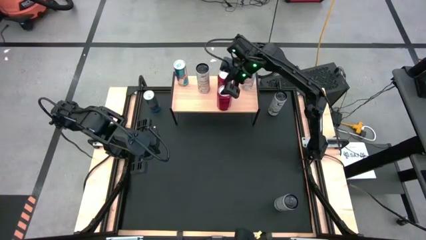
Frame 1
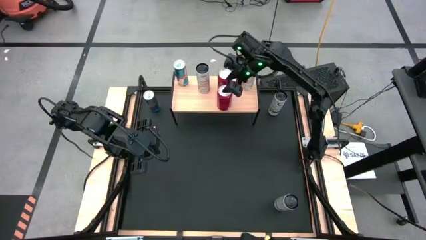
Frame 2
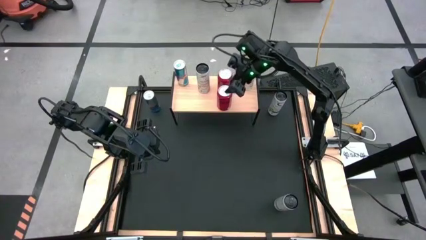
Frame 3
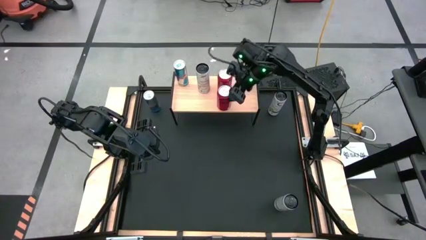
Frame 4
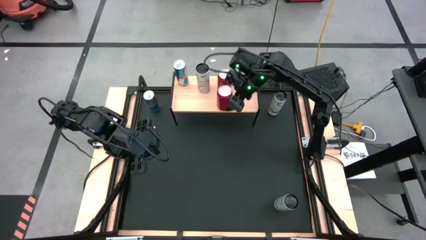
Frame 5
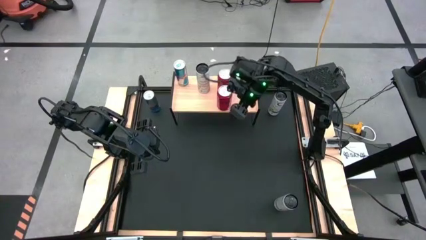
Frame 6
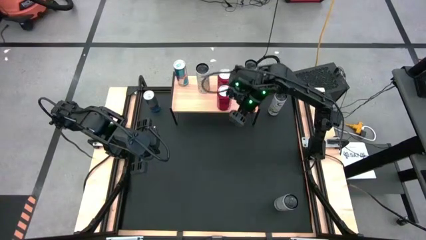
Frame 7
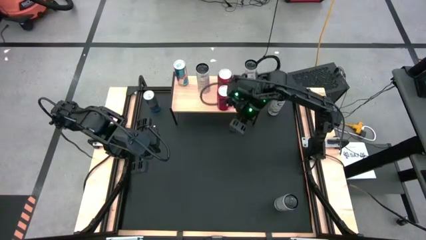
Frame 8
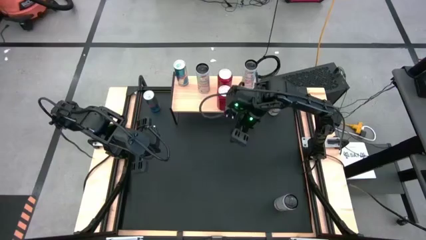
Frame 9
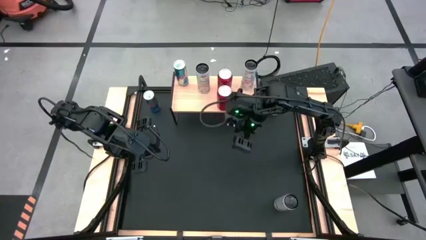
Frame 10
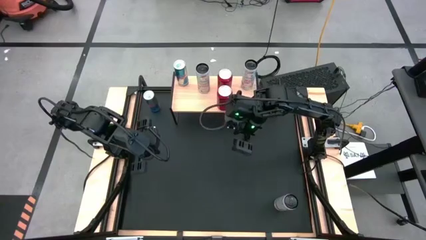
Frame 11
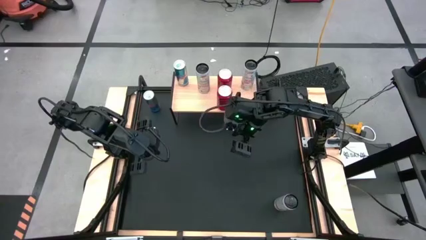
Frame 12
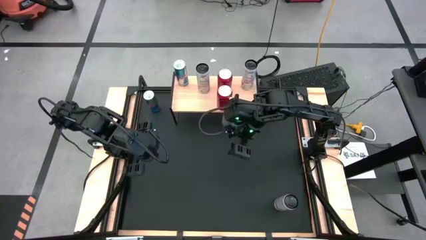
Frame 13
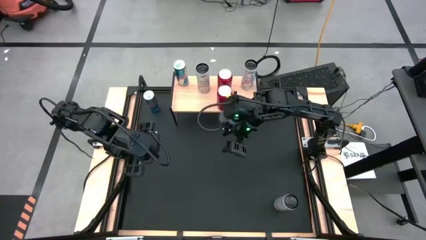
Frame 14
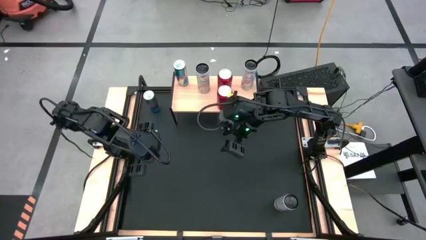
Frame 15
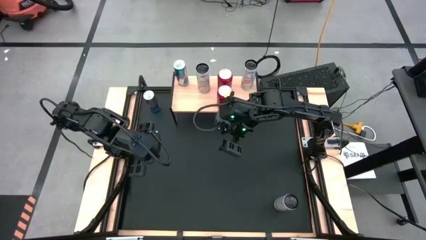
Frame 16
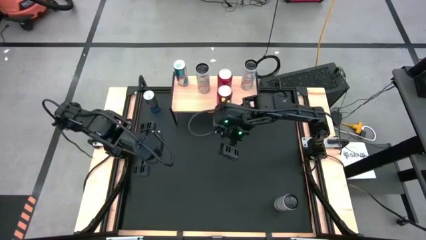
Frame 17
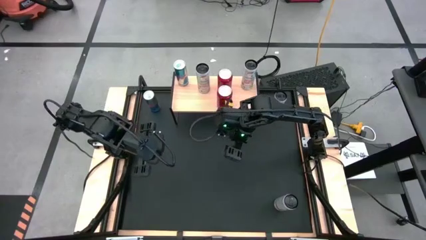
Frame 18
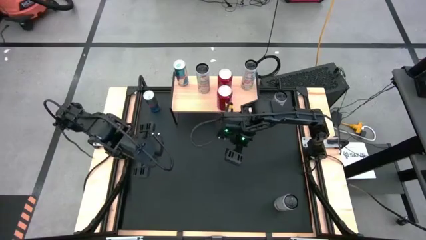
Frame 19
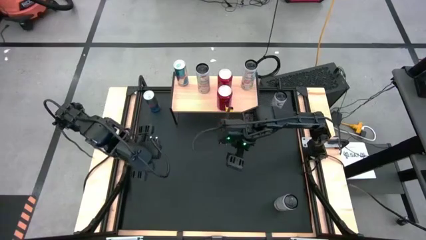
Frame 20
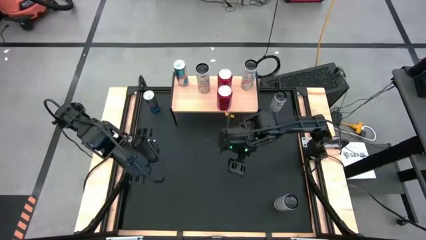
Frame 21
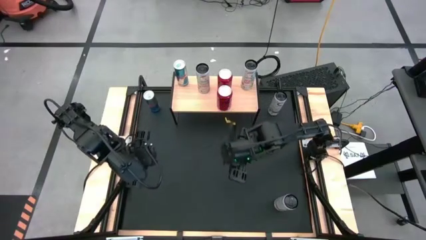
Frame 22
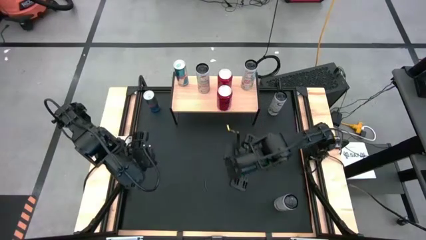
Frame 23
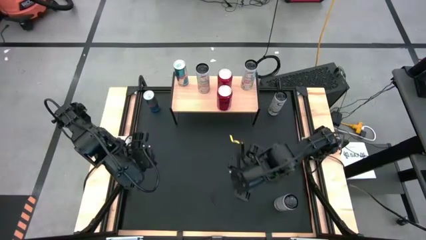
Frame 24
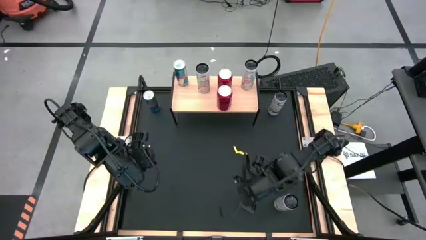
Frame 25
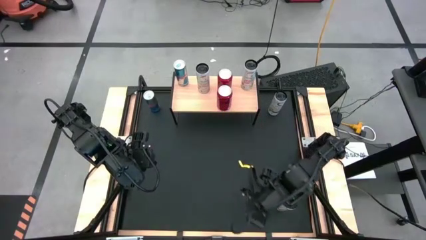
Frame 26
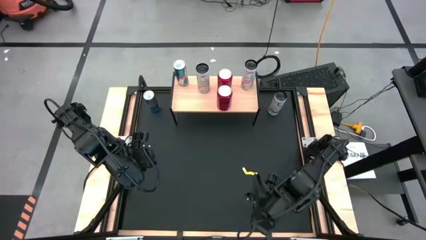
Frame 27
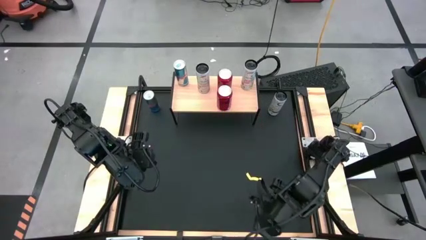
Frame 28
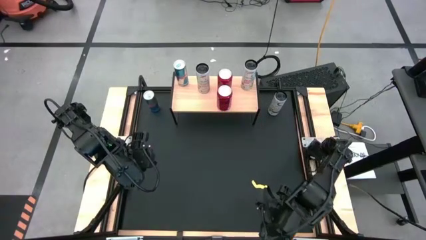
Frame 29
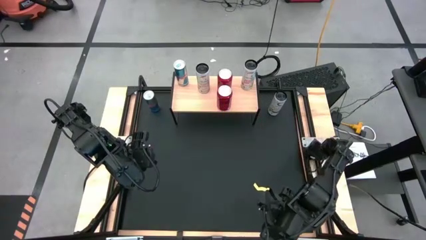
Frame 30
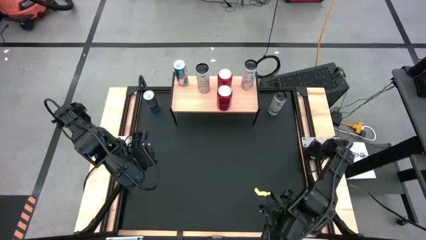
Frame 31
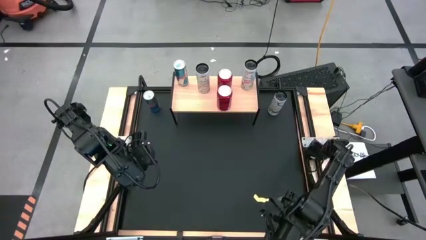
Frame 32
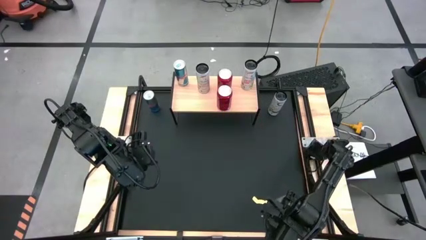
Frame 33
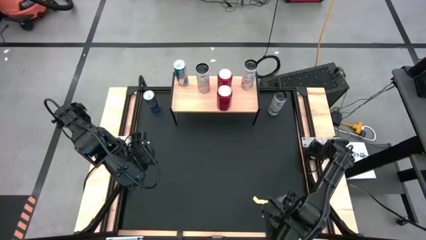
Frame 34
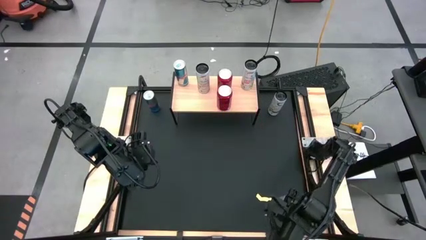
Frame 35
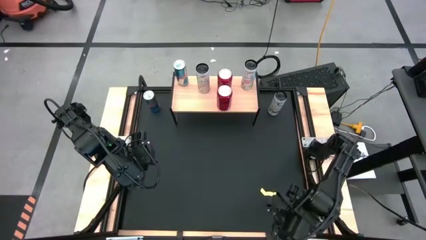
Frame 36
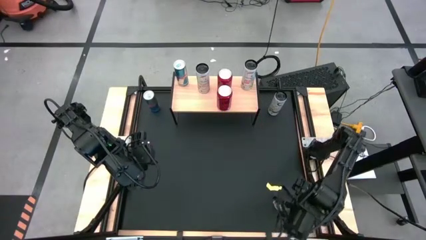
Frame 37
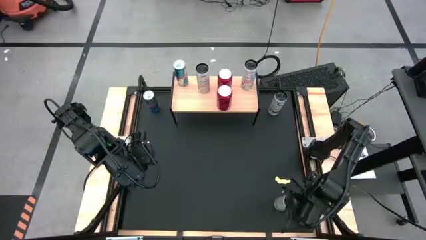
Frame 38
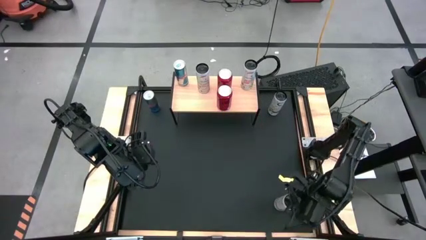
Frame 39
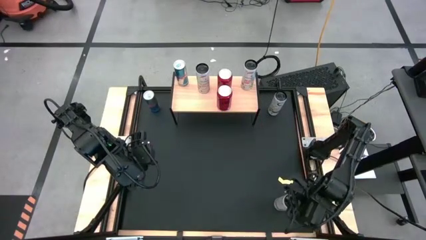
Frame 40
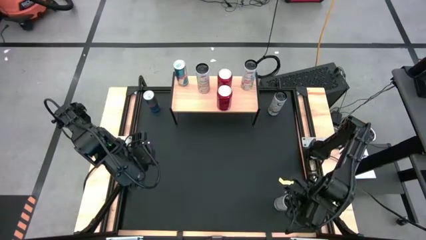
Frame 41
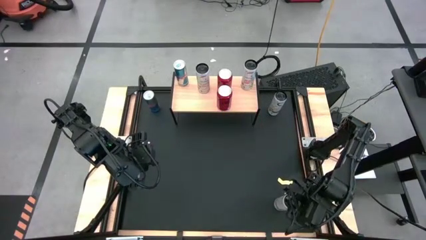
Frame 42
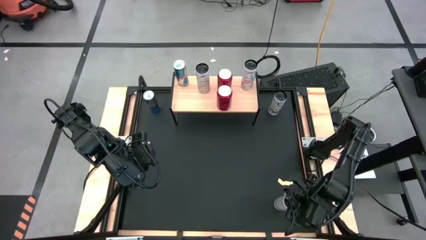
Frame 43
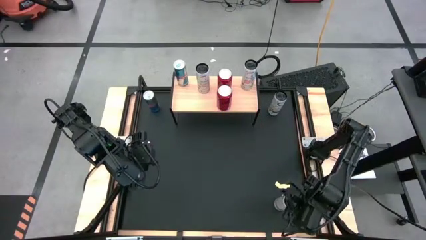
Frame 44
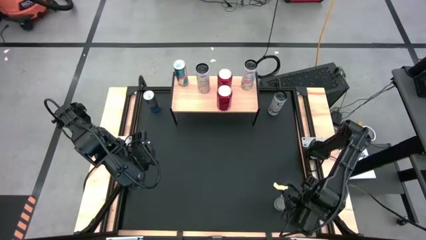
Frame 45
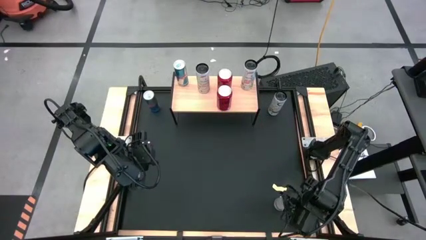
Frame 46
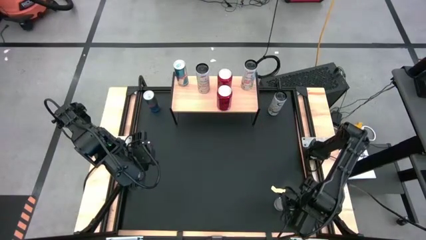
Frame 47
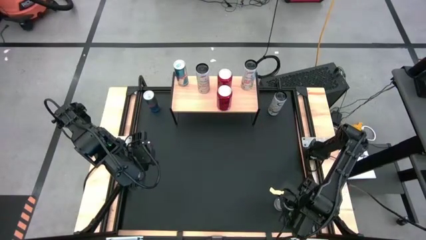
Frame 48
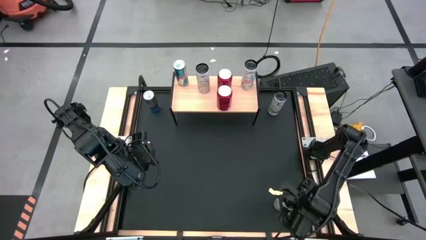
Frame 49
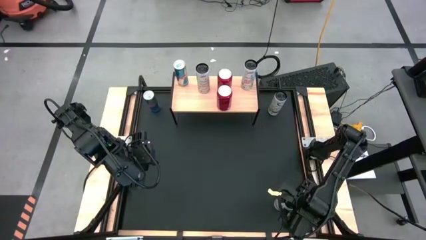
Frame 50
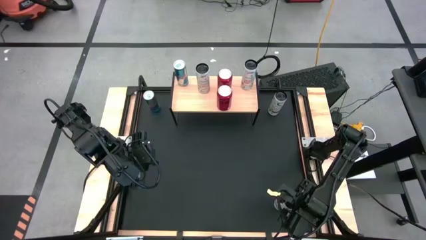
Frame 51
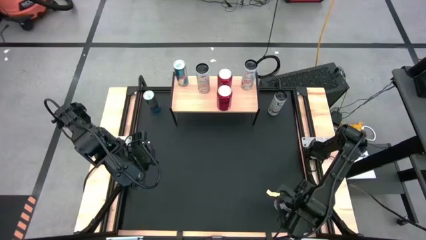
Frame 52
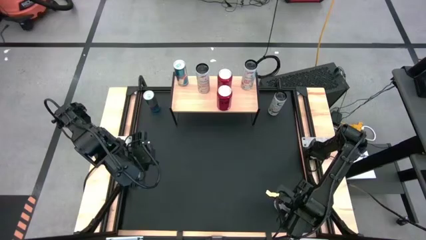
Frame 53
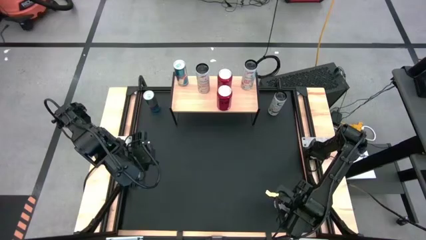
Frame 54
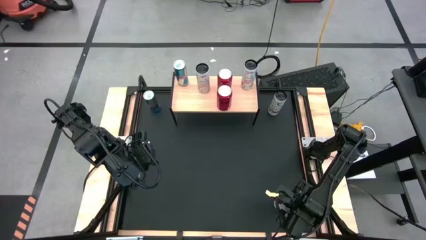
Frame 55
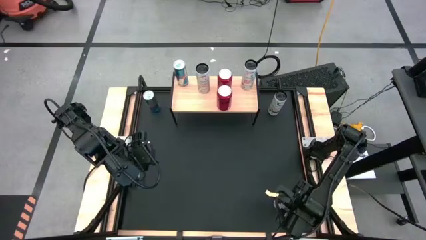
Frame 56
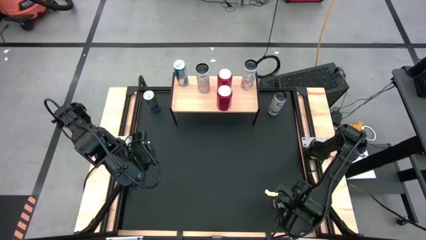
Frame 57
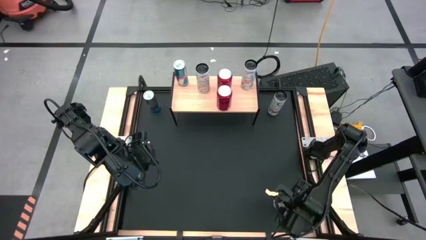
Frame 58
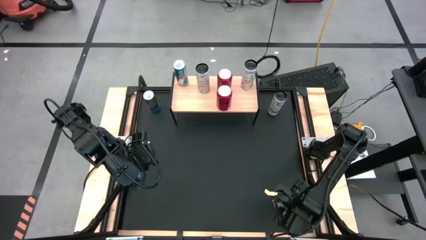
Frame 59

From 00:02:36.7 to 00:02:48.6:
Task: Place canned beverage on shelf
Put the white pink soda can on the shelf aligned with the other white pink soda can
